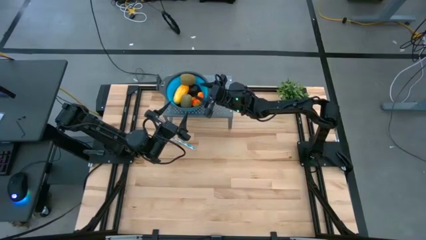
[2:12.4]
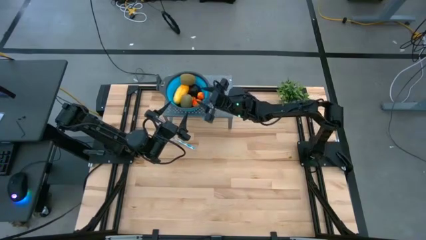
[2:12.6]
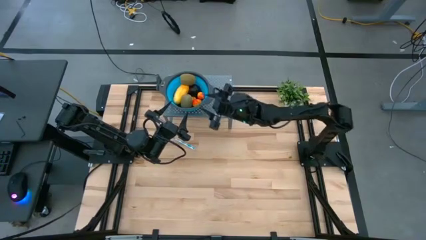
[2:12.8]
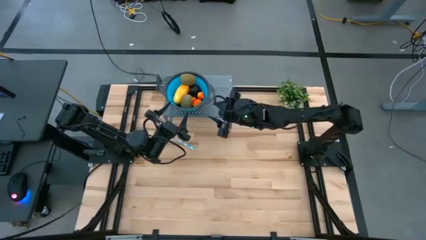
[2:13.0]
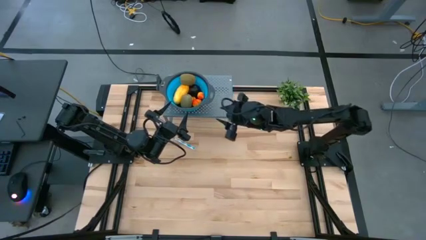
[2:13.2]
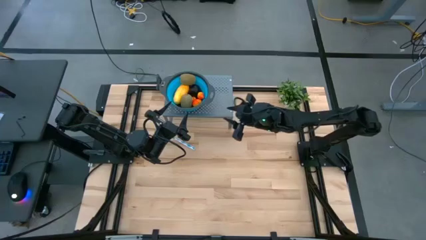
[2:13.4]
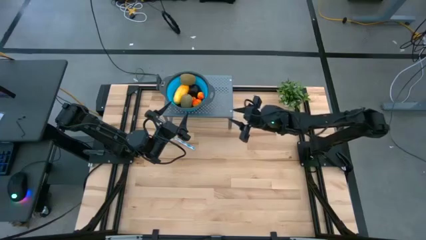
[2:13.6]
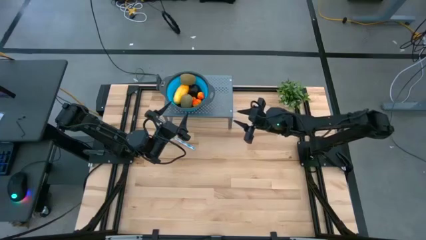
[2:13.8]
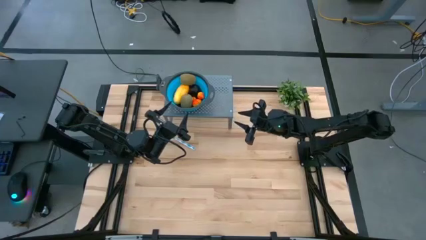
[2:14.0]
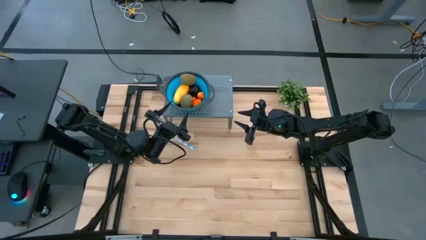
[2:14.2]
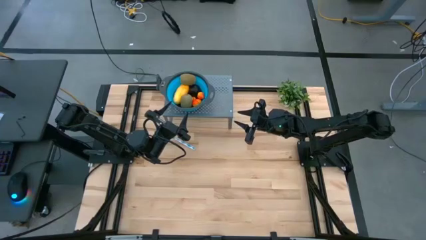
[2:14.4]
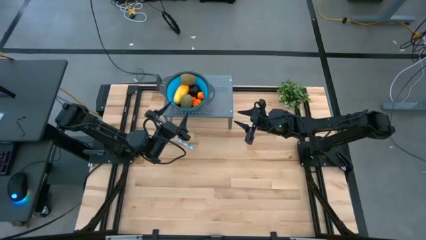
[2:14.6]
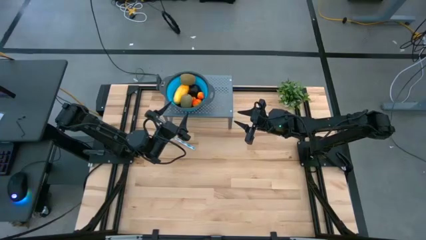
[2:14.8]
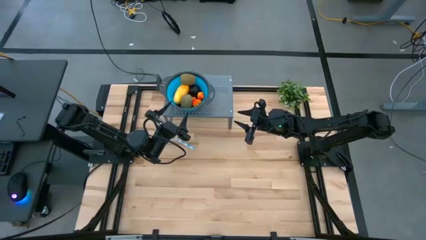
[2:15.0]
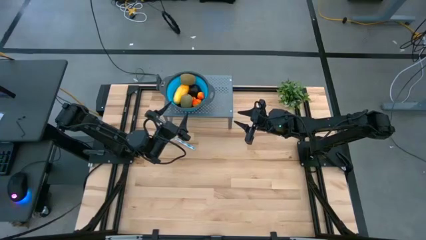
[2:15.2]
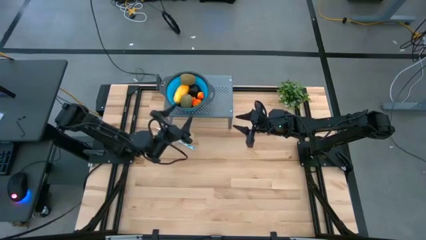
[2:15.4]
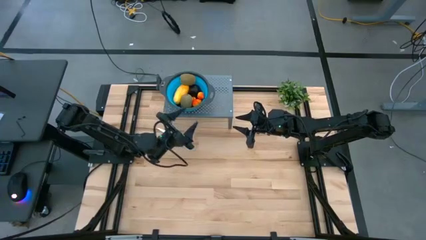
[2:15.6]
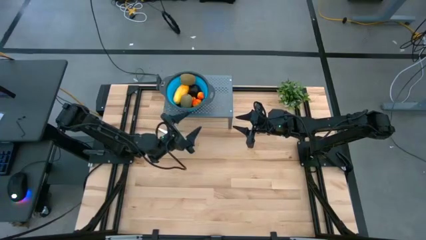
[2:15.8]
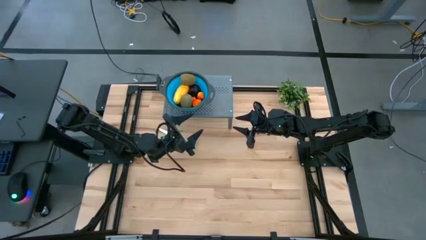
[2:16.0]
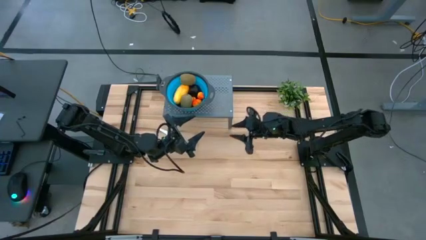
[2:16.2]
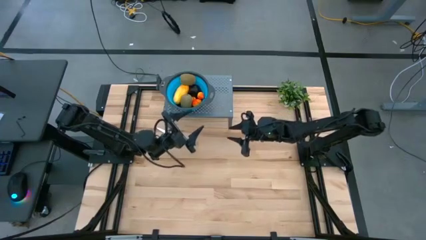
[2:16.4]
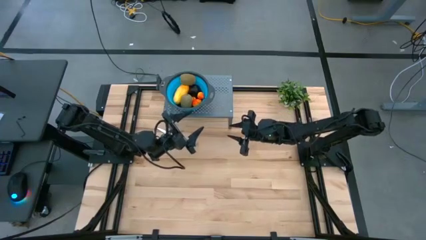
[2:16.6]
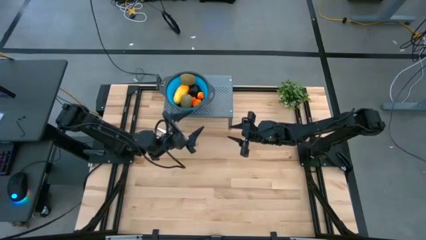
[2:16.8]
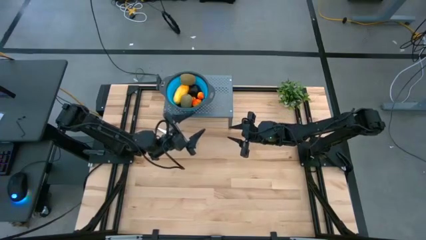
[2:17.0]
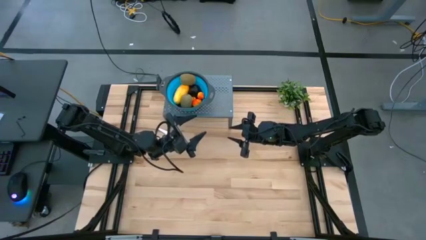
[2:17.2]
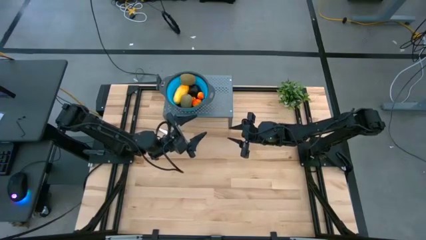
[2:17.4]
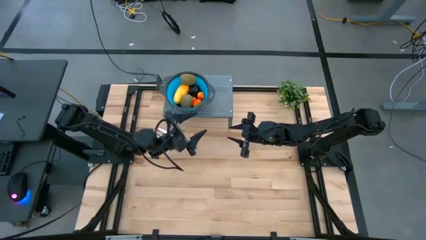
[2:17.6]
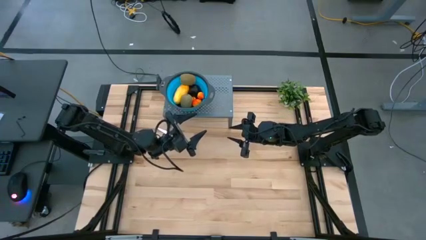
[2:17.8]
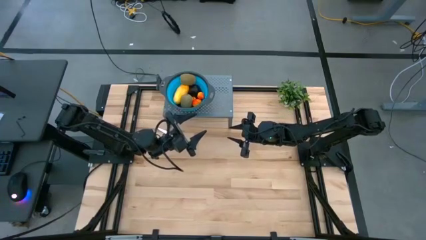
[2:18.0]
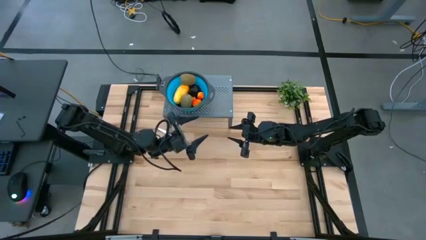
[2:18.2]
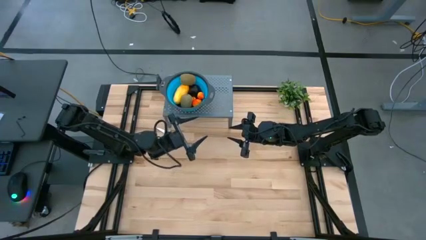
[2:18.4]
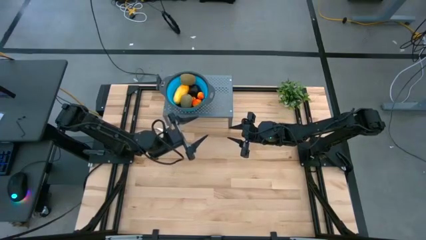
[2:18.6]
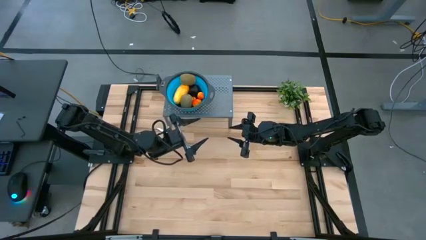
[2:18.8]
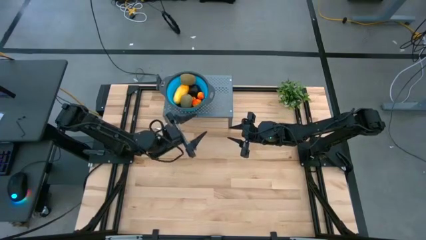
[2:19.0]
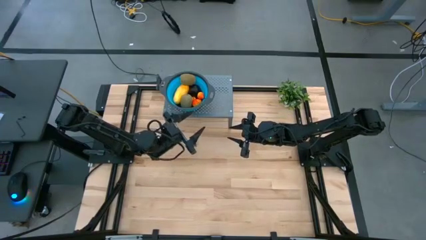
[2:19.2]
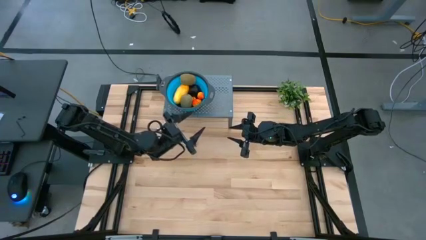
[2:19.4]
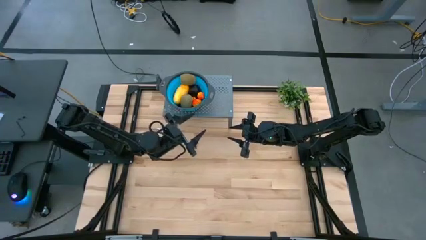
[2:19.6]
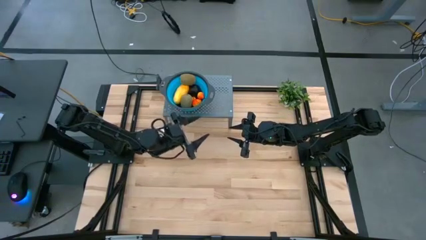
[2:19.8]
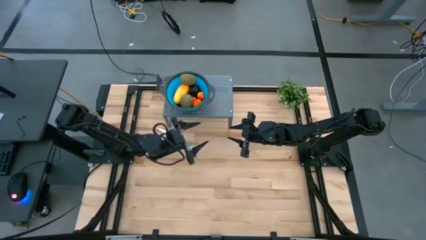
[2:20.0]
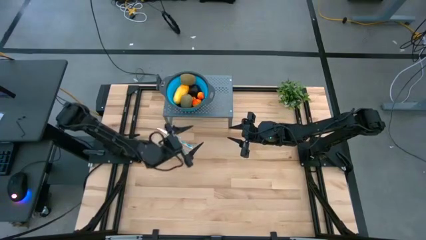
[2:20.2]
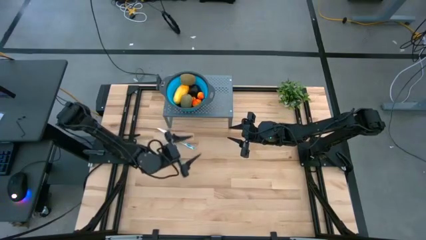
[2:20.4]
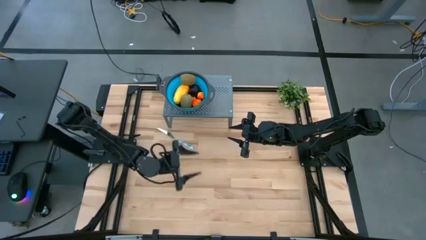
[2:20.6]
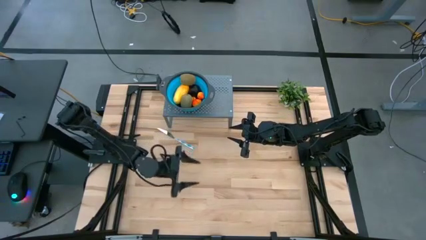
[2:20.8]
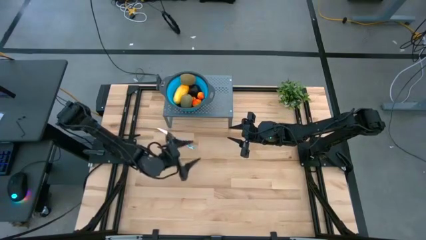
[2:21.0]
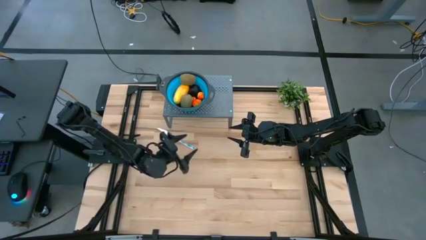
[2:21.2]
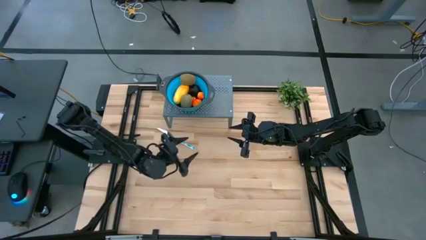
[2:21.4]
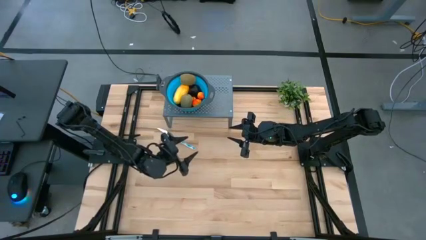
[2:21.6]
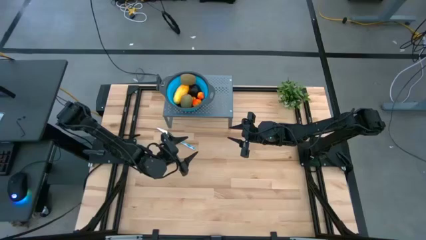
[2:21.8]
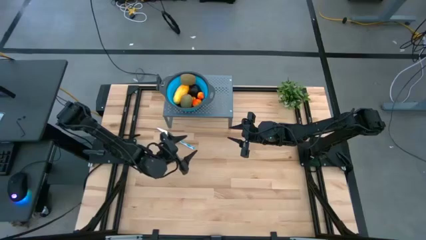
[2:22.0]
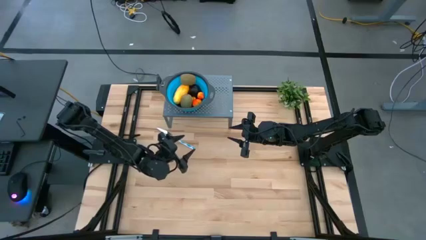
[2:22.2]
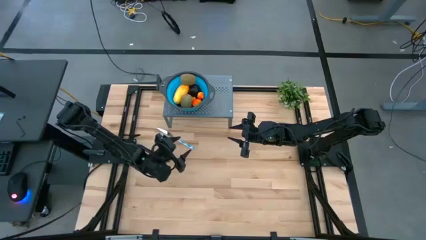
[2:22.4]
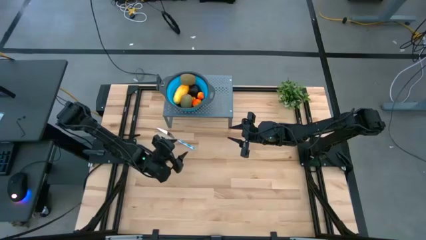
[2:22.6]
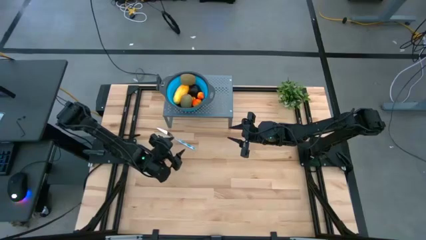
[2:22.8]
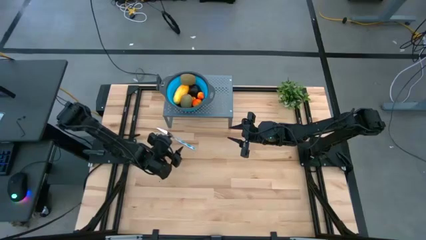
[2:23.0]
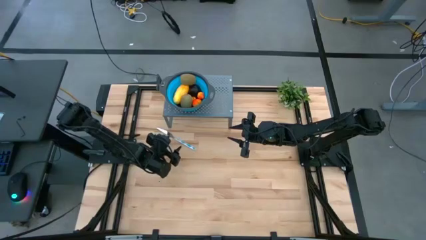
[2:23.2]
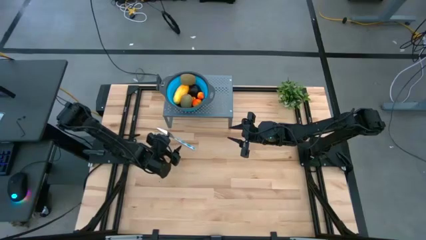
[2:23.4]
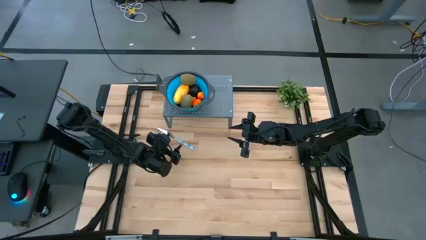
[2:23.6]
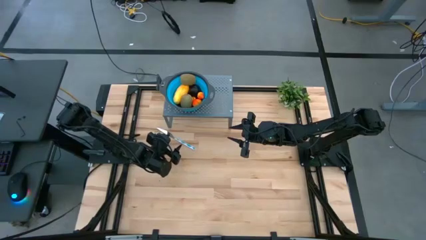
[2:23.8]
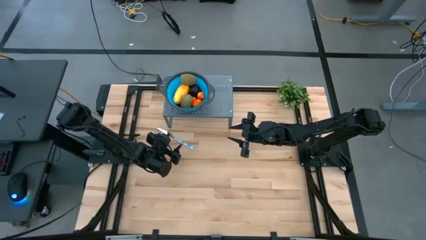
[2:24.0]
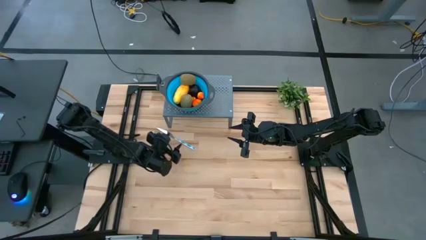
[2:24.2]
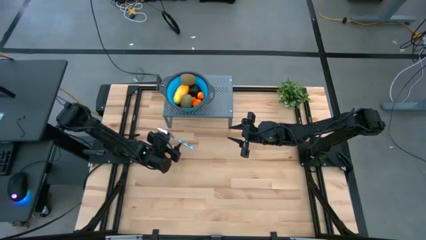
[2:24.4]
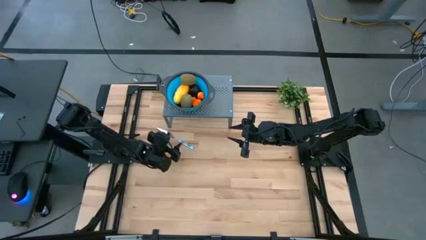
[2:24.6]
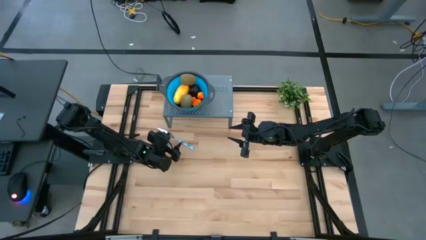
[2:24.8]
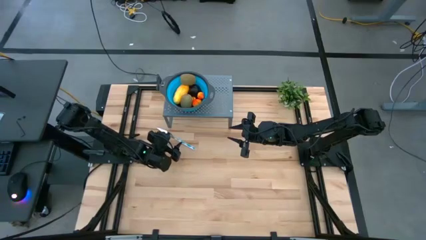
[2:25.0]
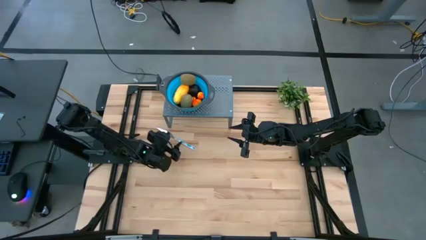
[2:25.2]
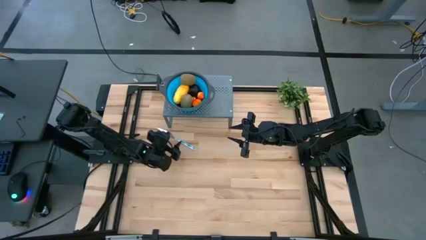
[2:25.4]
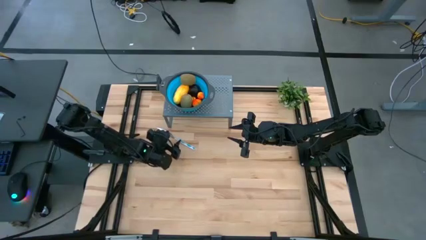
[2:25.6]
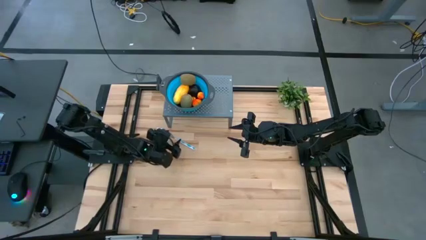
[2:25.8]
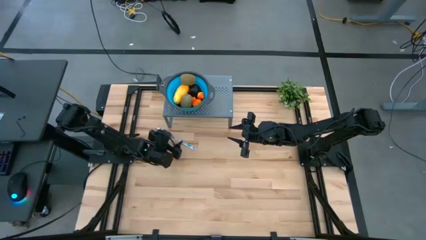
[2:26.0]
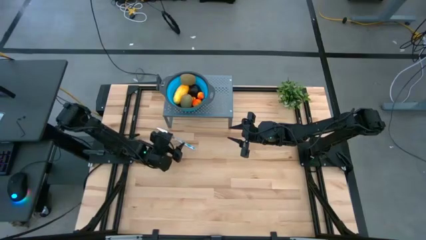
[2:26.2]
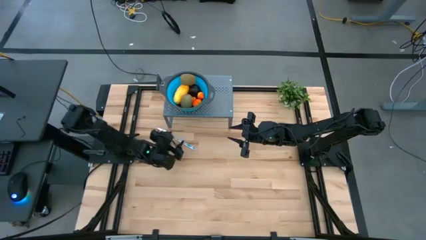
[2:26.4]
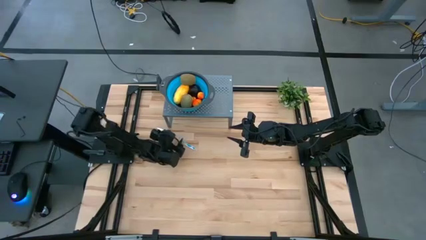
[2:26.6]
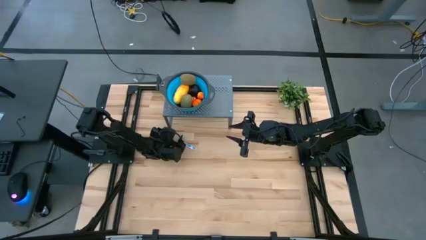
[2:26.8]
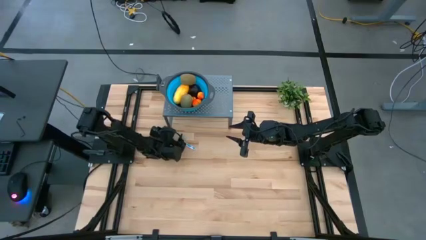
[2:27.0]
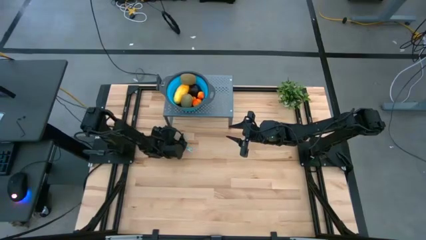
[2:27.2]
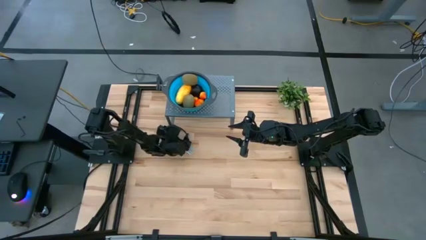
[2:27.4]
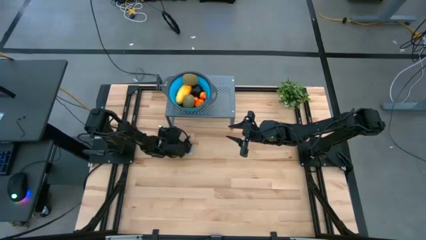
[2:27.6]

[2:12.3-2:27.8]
Task: Pick & Place Fruit
Put the blue knife on the gray metal shelf
